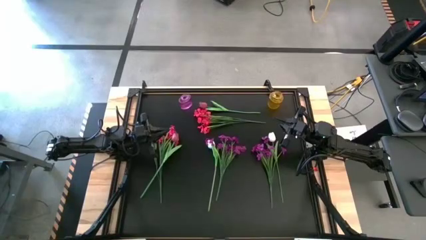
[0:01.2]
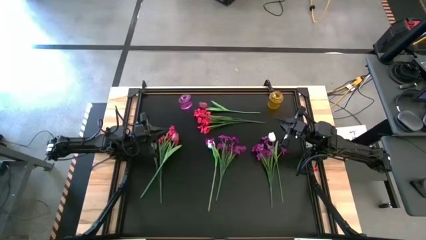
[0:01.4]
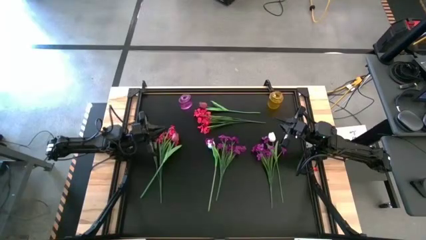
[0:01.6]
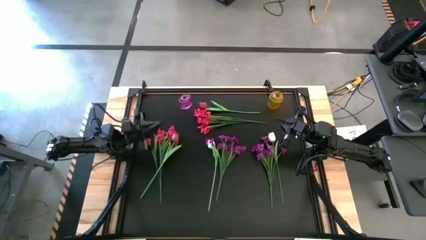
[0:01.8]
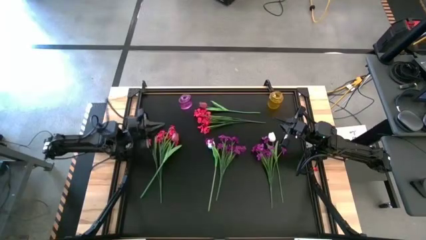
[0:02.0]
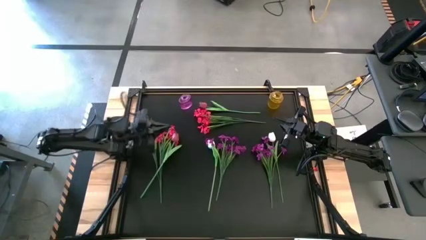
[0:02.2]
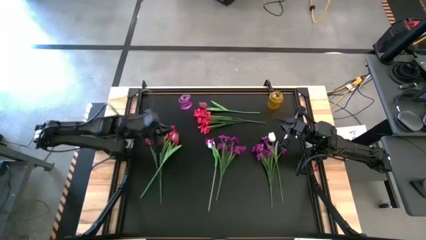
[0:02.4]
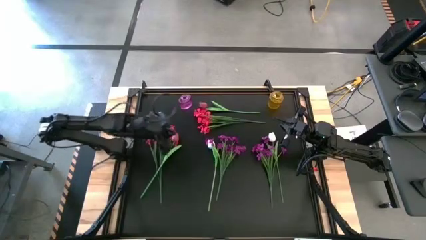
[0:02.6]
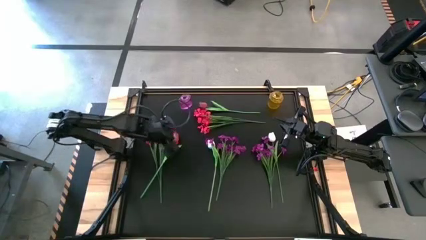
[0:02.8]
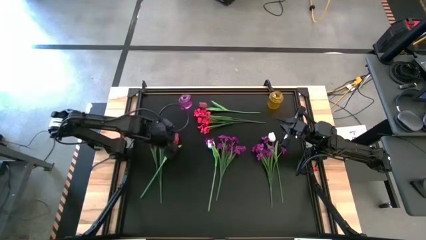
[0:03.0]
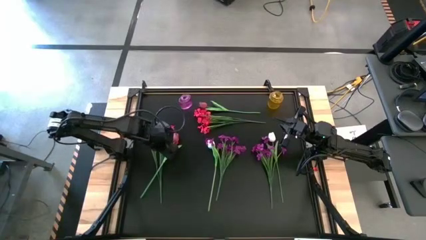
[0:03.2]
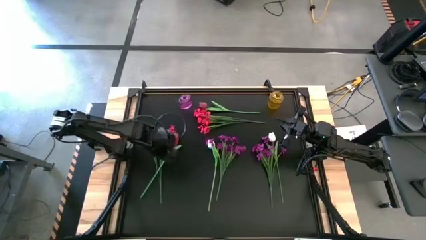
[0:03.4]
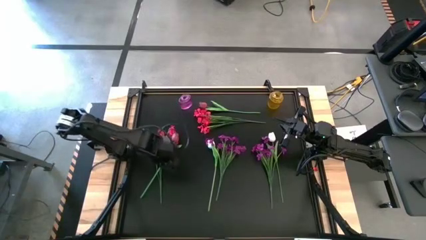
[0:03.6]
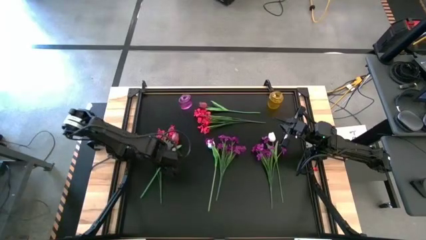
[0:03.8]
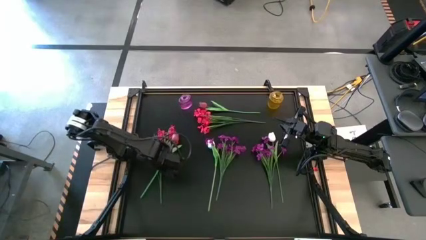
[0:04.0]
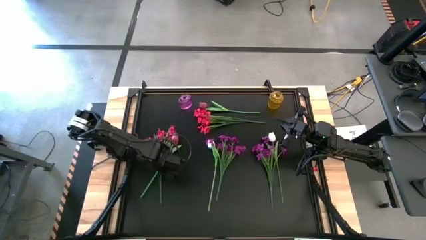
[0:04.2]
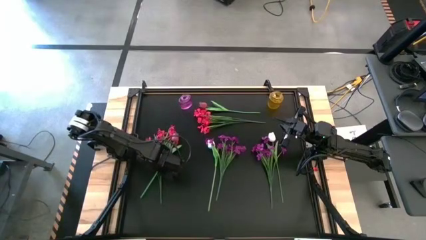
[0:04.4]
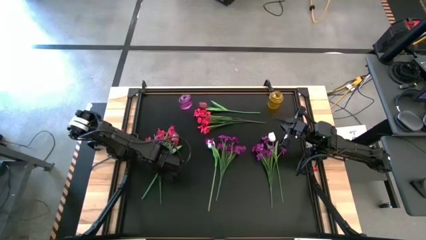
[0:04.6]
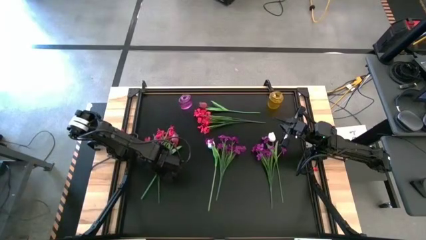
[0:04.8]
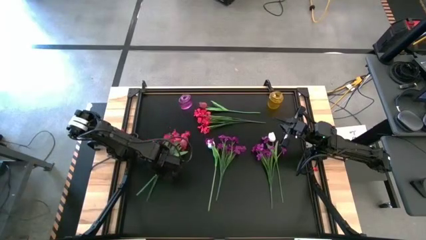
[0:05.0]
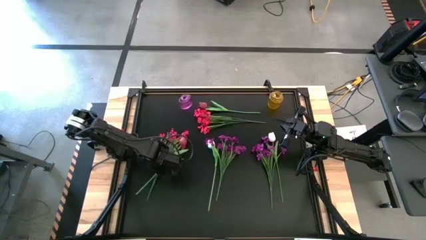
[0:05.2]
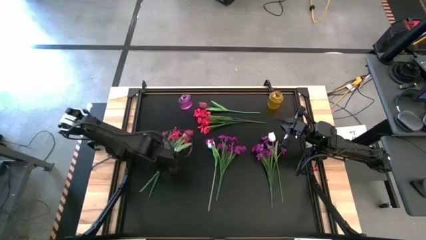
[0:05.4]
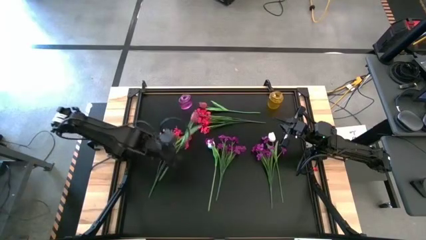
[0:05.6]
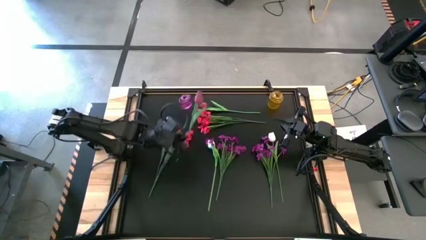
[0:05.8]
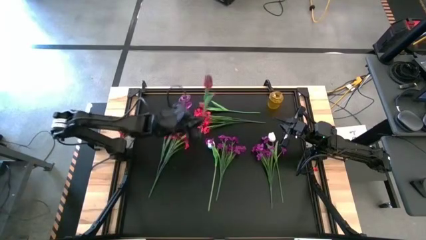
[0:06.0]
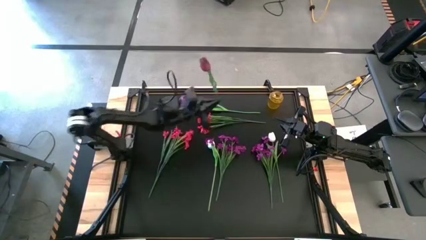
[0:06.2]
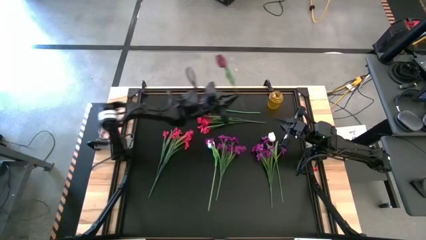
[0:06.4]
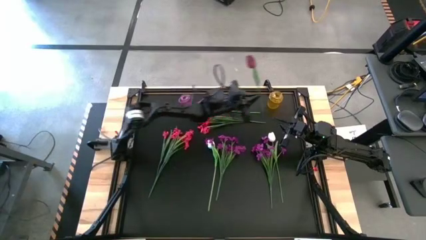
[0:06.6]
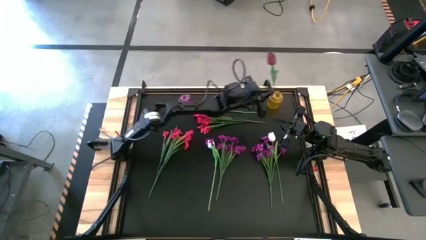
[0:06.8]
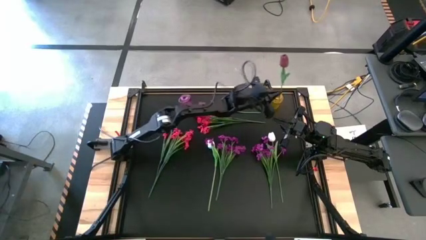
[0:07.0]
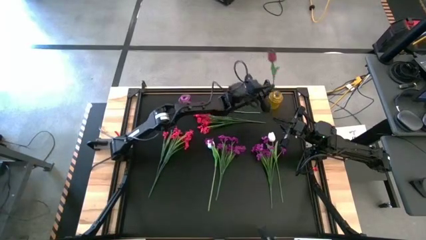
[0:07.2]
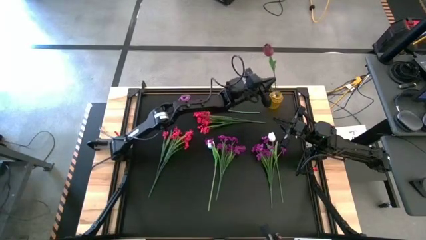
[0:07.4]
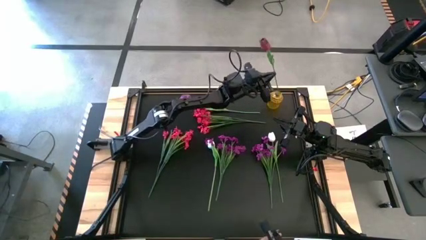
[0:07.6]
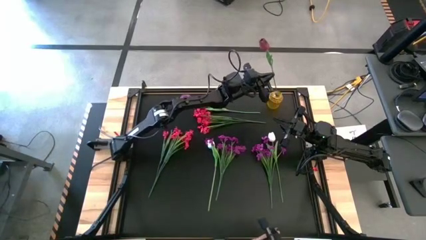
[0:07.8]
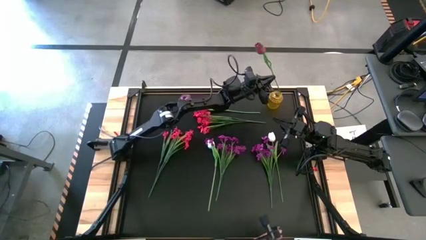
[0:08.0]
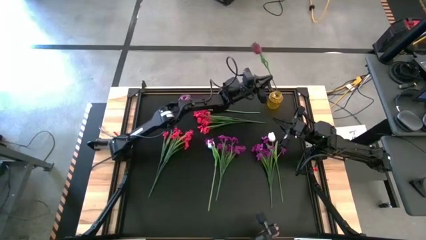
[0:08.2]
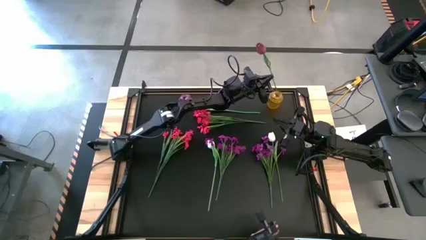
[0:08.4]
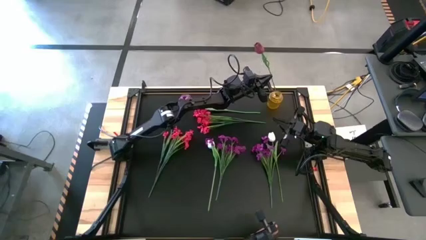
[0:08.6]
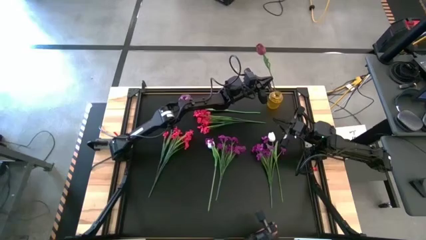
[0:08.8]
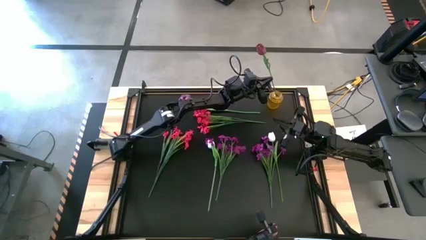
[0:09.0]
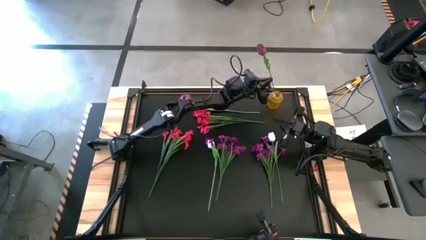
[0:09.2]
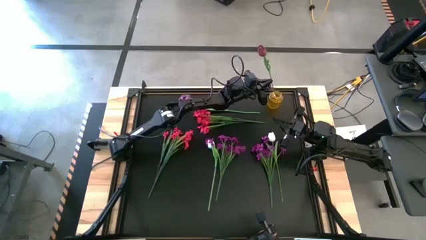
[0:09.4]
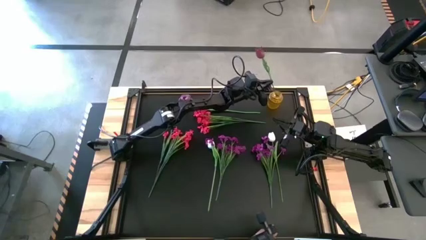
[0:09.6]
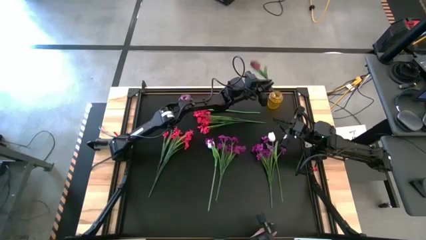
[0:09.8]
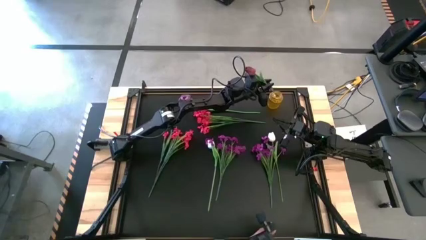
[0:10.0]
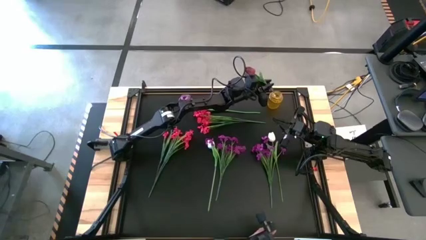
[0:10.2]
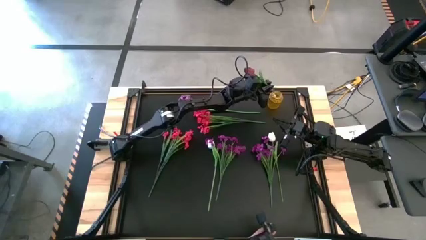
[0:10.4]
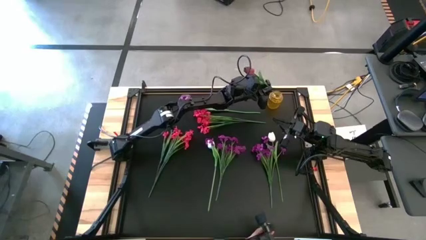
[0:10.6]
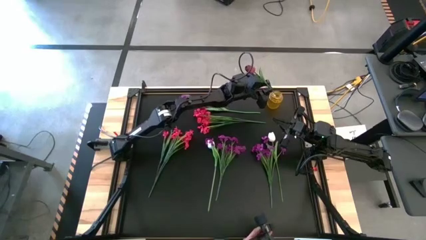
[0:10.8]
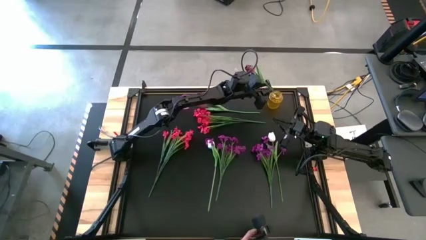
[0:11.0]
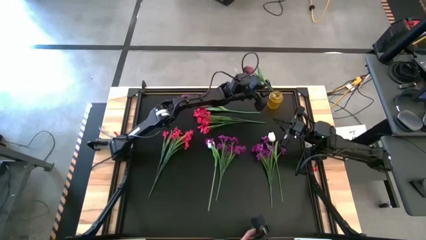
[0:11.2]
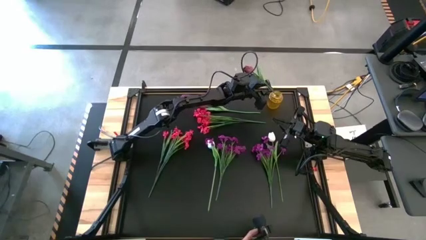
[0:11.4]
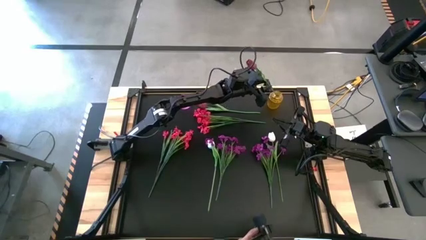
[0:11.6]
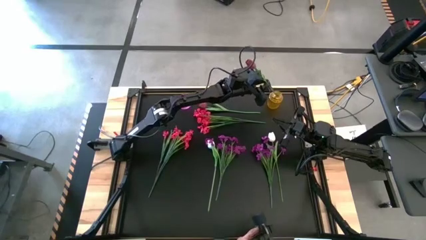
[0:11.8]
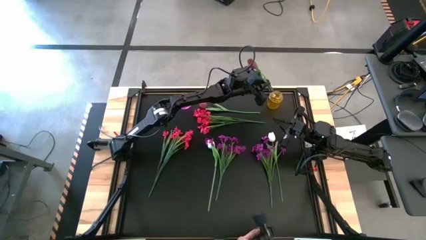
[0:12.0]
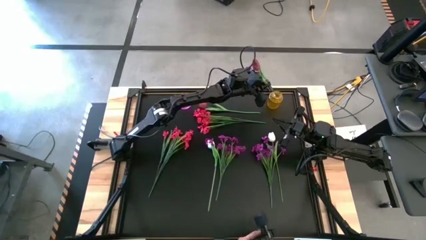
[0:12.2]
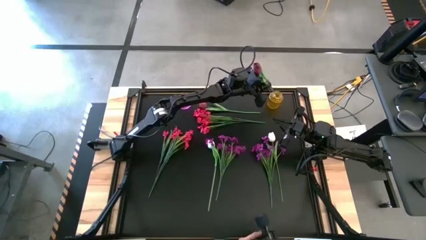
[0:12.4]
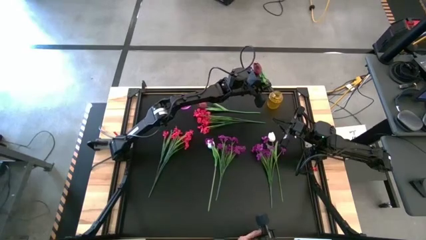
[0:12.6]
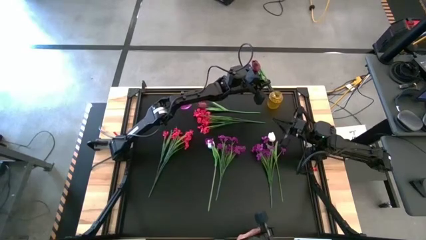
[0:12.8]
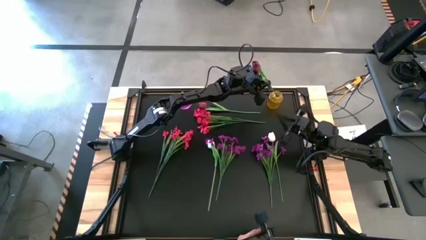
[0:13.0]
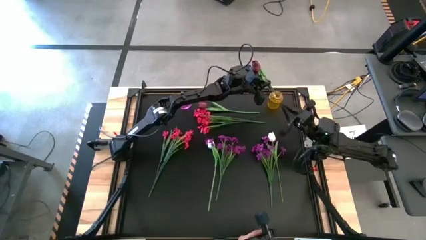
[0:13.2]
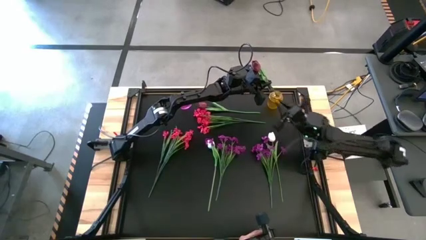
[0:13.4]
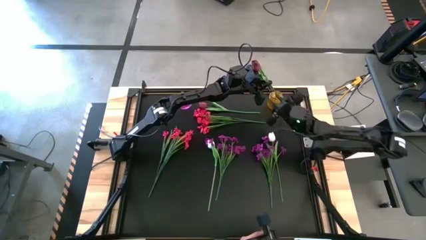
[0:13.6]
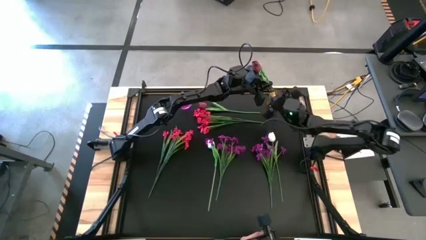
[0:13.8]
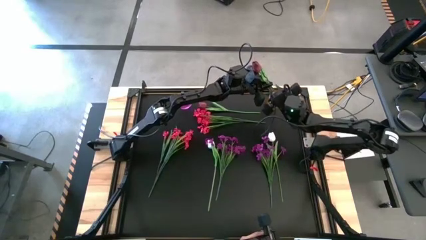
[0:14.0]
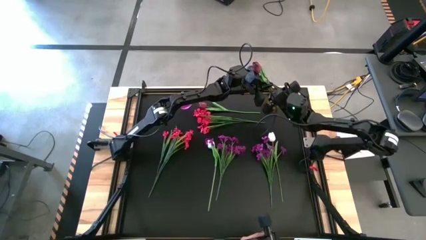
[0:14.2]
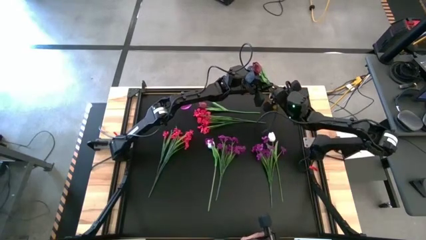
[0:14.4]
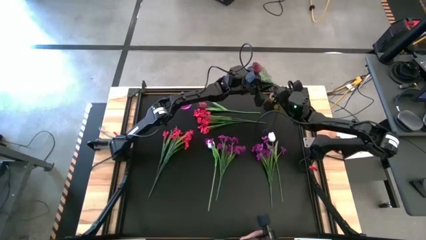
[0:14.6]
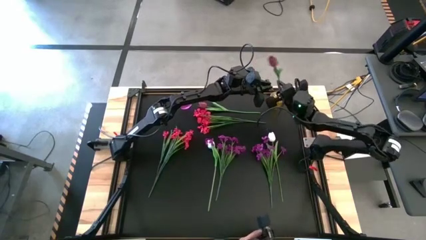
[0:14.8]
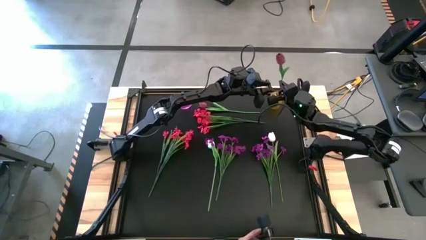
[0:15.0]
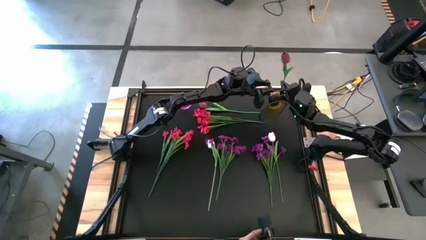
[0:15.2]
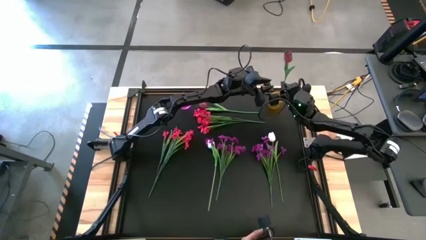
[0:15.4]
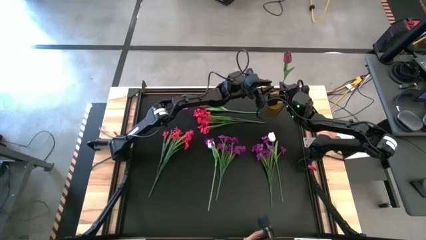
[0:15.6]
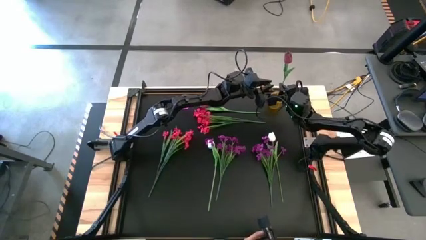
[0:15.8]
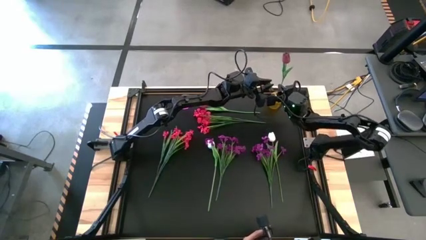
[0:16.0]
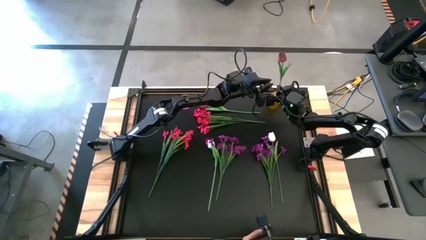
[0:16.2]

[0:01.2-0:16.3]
Task: Sort flowers into vase by color
Put the bottom red tulip into the yellow vase
